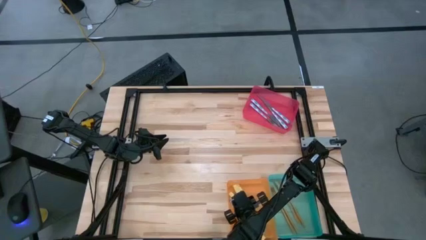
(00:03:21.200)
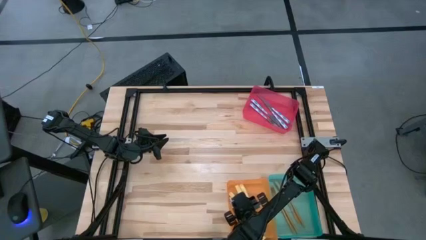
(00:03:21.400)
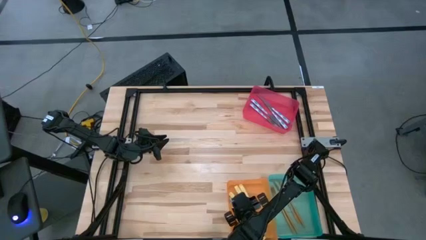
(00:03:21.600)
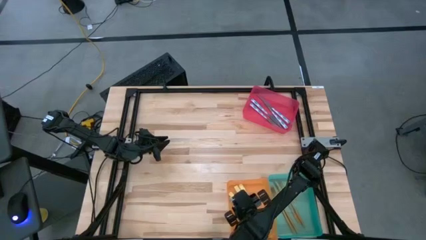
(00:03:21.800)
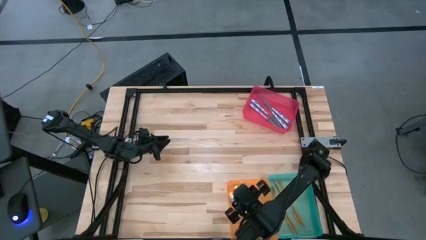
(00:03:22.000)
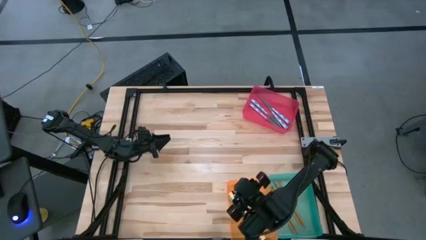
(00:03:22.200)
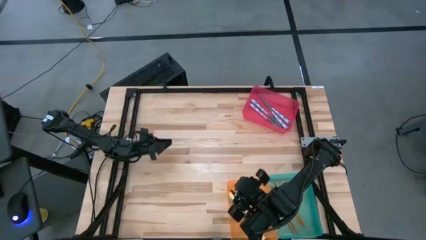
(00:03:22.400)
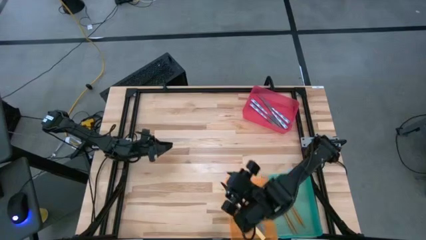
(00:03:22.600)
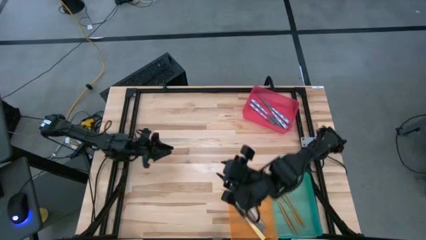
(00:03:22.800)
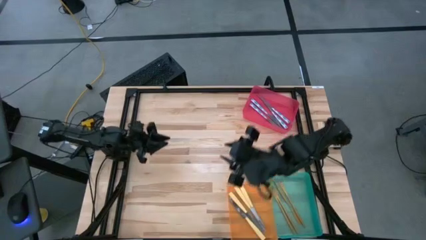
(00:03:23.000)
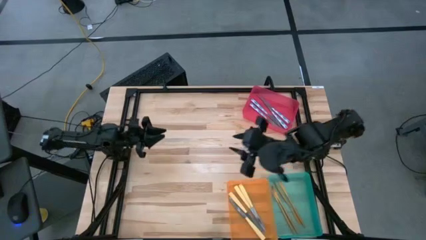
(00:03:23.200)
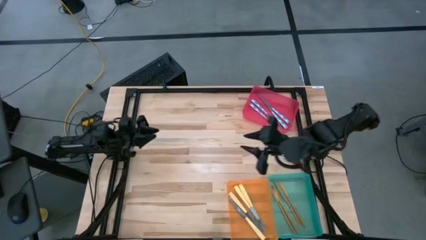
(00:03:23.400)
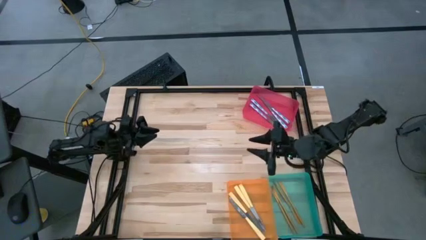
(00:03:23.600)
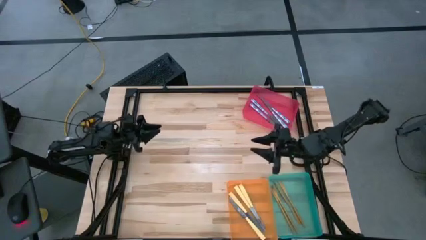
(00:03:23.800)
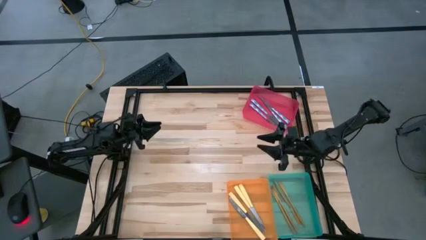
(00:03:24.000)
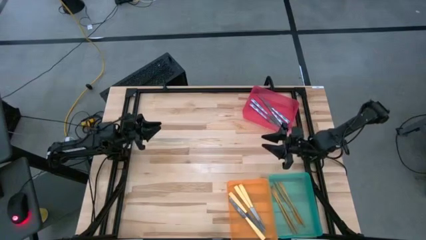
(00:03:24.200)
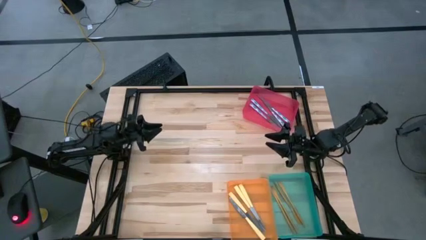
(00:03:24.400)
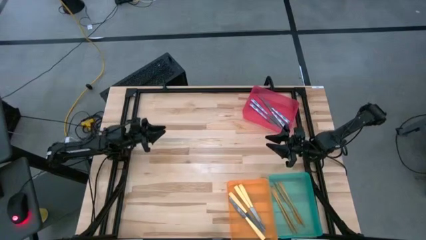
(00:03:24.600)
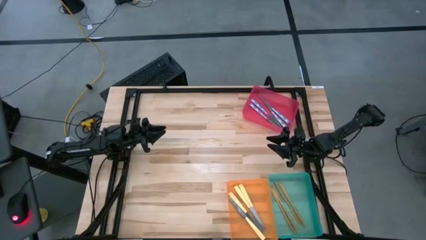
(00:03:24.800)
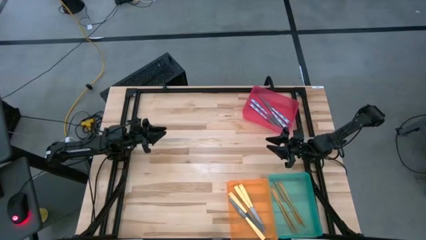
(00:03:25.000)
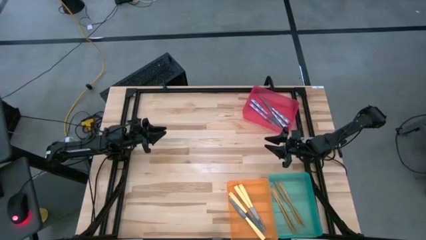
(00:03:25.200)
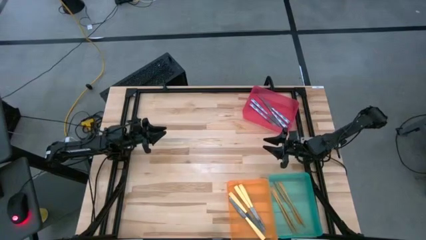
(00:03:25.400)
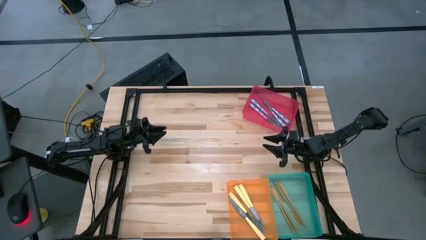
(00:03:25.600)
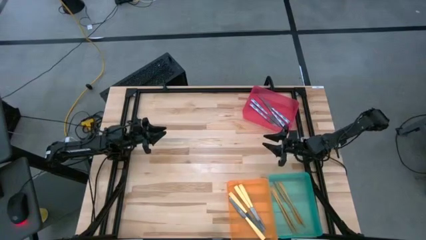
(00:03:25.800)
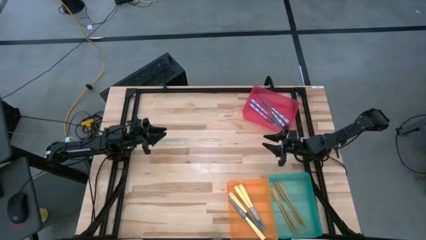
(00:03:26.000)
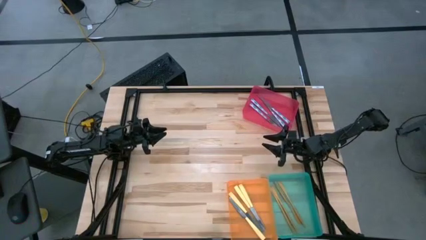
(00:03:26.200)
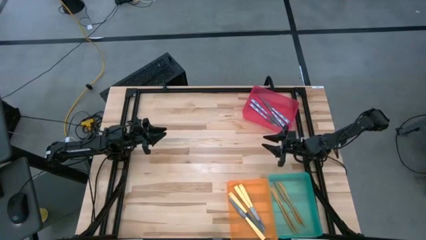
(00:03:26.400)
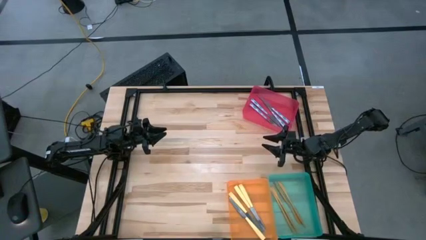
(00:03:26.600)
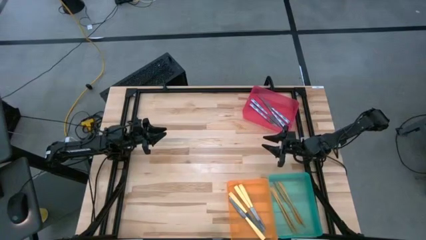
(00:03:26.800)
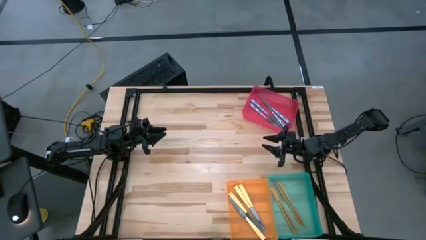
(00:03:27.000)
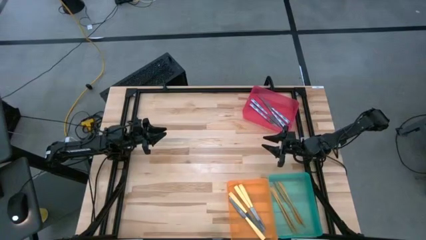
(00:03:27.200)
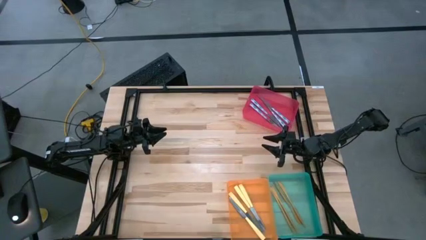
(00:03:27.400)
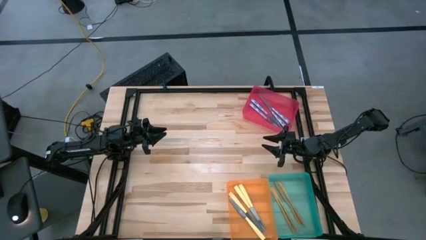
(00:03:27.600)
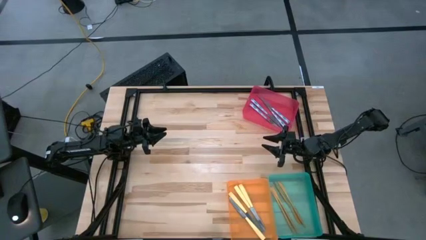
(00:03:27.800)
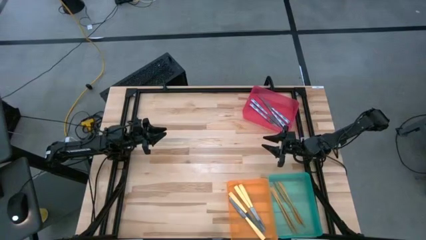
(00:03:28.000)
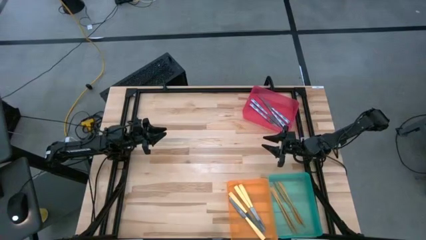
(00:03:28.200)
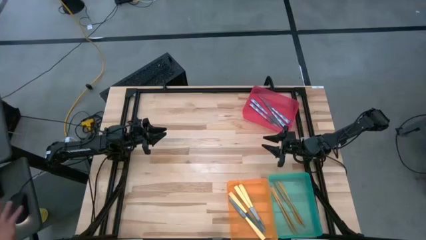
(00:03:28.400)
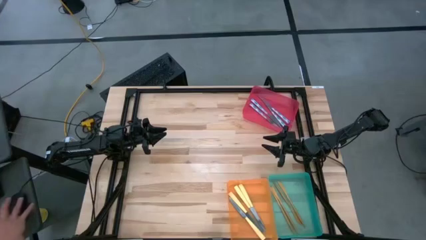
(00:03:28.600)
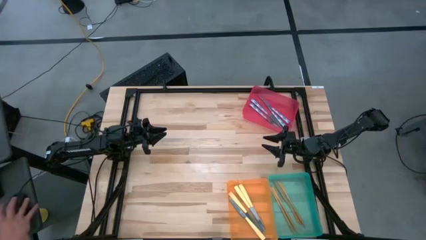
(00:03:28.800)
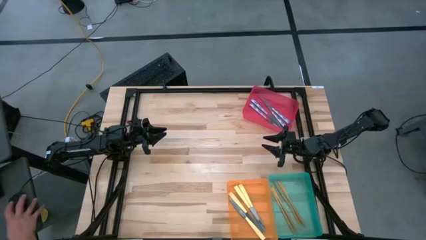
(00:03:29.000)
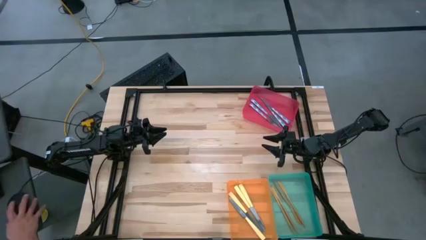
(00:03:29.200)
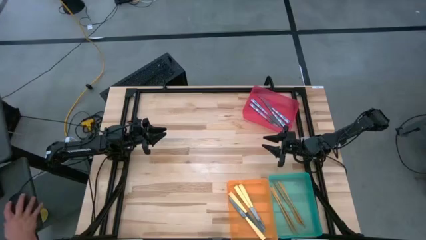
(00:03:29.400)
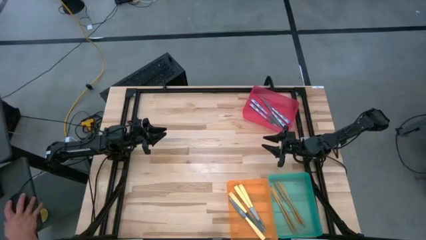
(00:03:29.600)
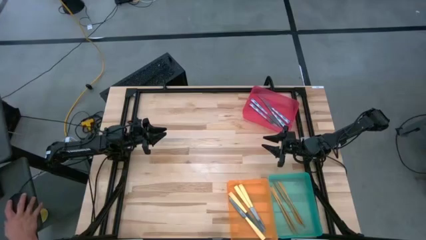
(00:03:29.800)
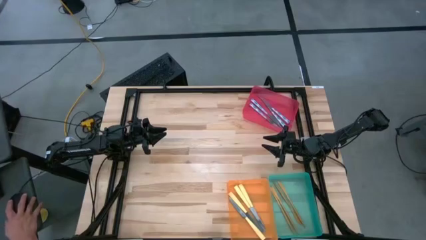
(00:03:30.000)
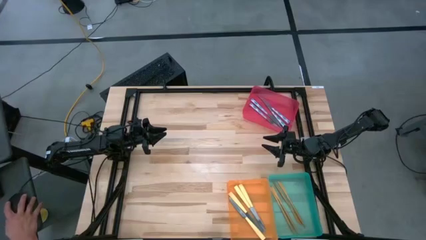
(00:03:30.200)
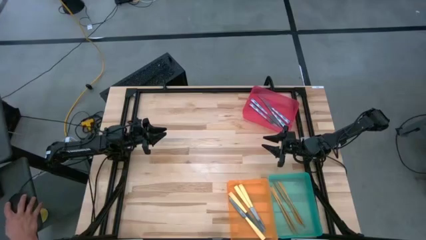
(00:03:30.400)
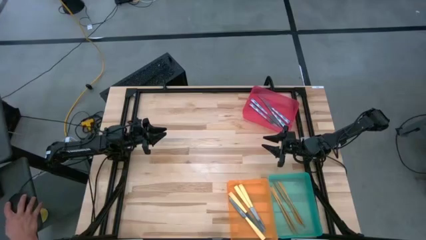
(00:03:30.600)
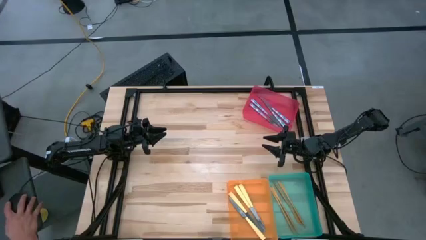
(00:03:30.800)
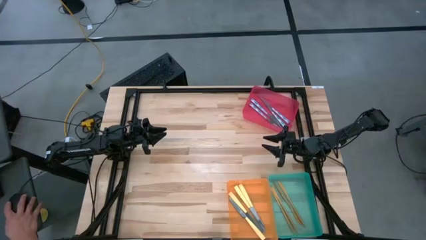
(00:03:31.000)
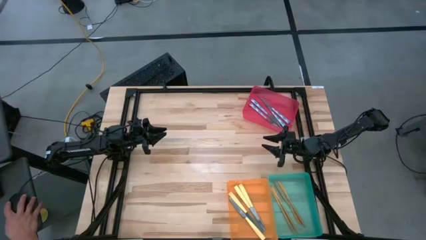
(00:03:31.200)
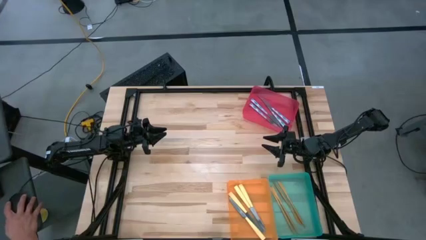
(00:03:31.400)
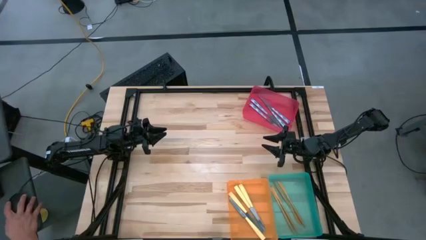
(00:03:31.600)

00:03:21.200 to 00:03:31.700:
Task: Sort silverware by color (type)
Return to Home Position

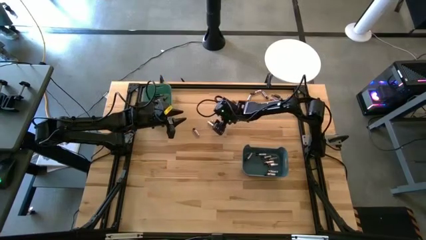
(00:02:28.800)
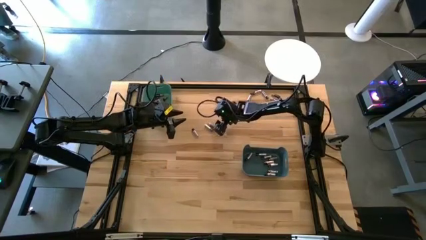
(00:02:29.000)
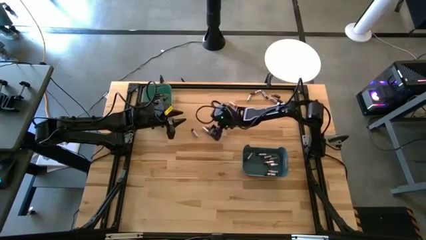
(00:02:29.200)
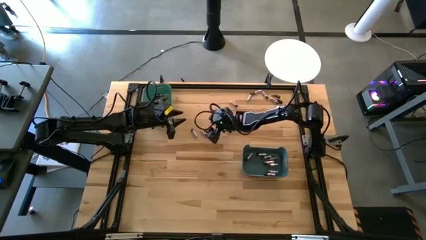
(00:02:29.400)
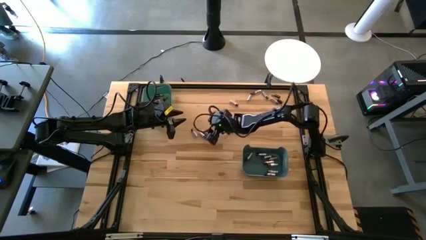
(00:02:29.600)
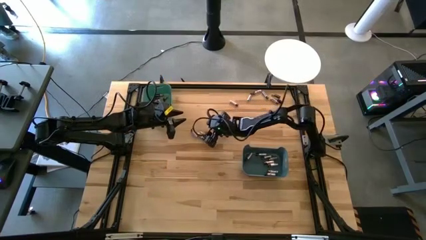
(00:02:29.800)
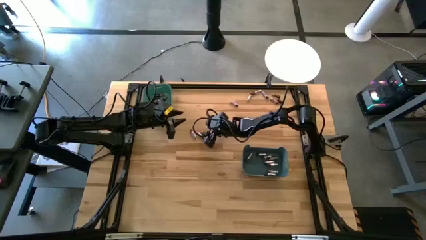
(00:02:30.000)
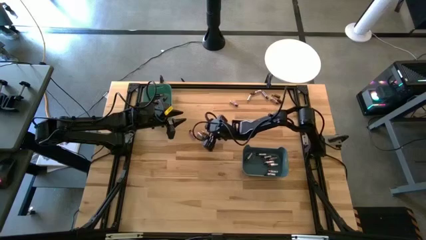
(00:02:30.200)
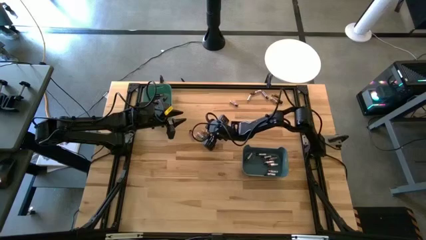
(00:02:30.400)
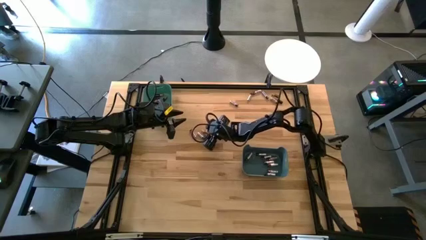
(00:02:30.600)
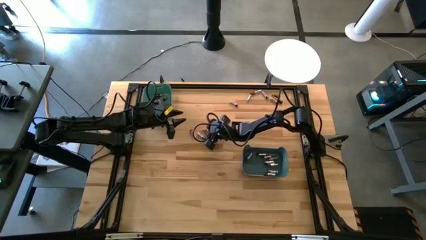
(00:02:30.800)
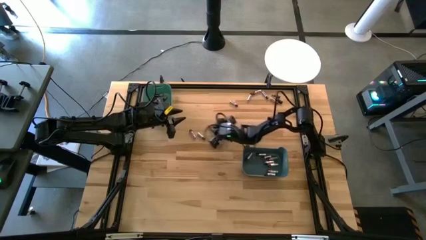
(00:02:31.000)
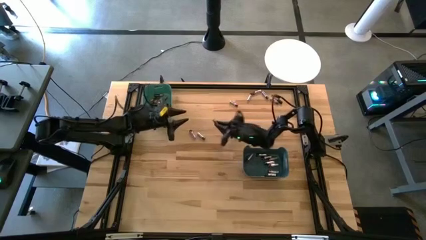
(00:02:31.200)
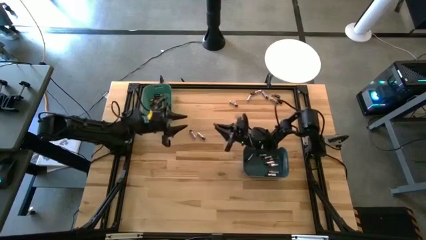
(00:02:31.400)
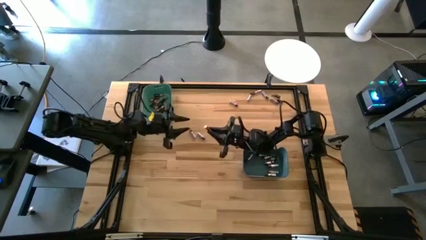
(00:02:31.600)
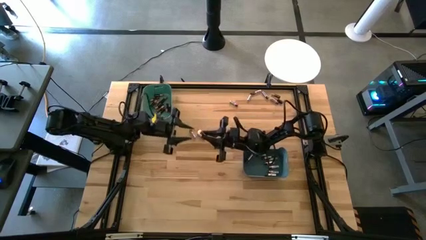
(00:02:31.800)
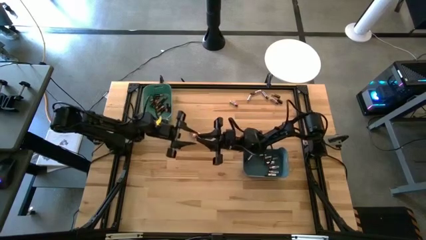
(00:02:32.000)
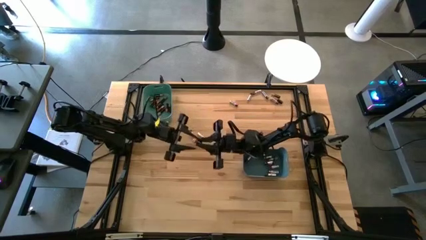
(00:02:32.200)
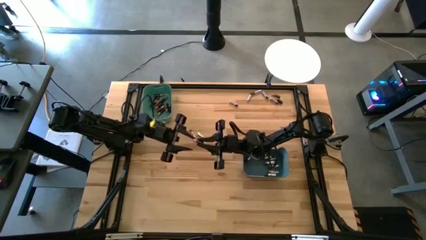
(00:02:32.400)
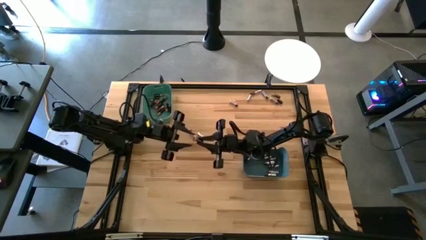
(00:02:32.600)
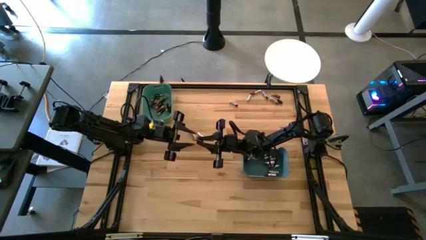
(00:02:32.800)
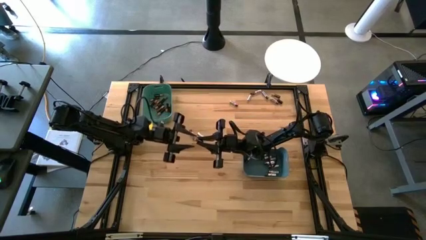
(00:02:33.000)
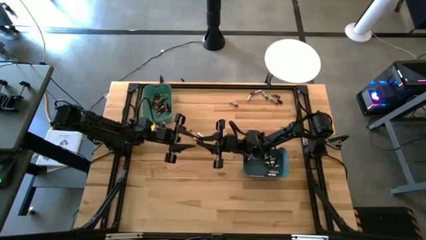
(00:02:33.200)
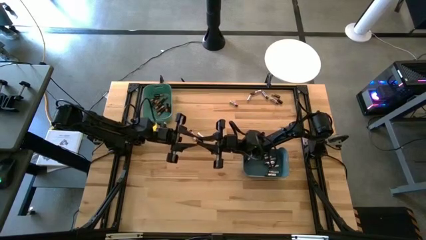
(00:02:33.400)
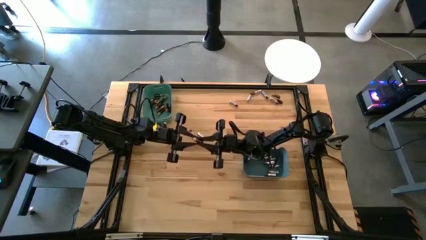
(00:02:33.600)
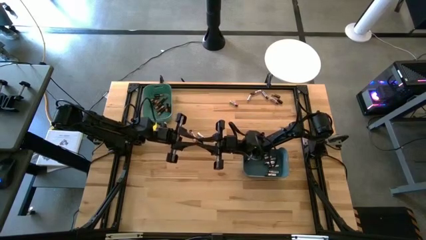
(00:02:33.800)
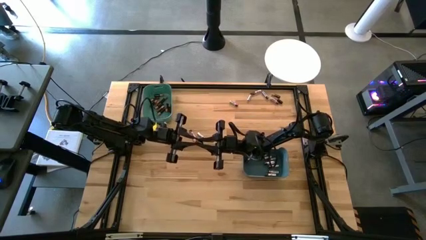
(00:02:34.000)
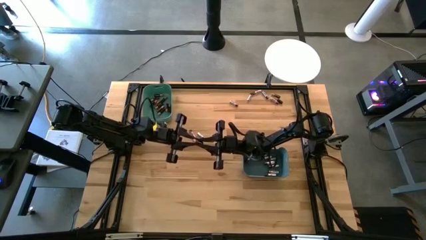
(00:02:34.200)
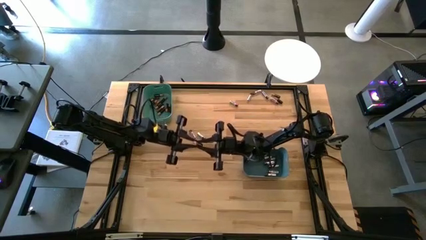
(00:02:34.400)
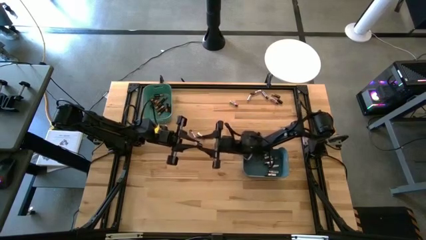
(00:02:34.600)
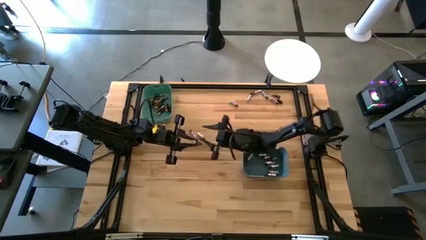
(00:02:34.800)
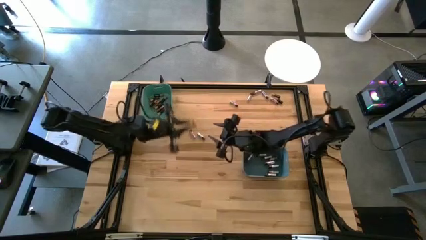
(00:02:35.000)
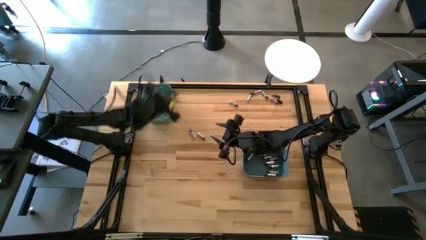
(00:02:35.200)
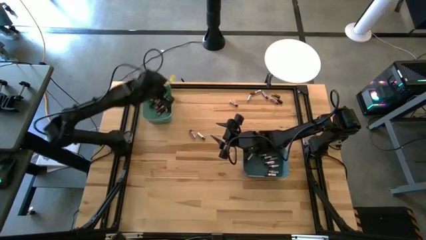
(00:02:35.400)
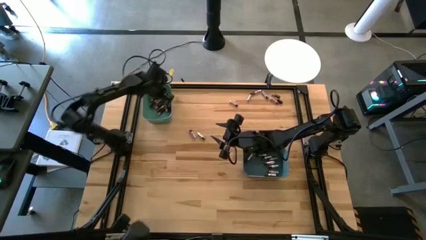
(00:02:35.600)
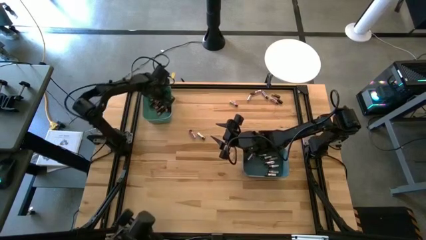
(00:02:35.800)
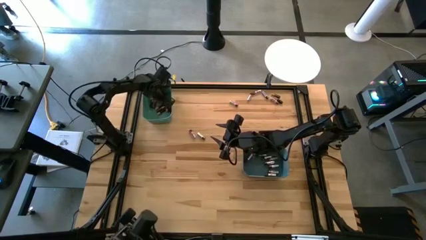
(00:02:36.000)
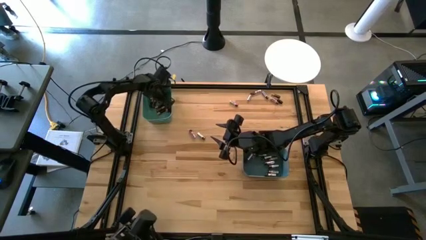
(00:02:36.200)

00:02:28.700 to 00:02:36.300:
Task: Sort batteries
Put the black battery into the green bin
